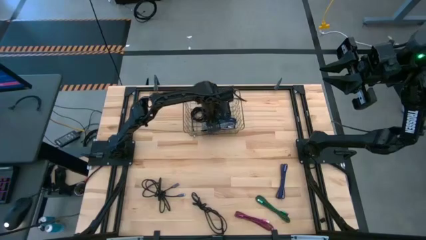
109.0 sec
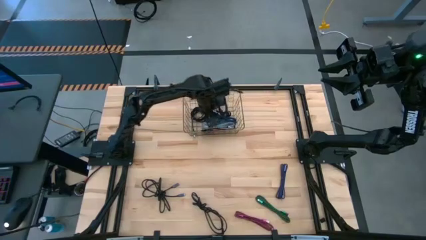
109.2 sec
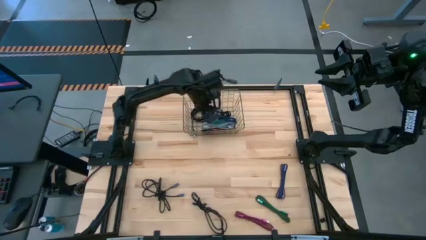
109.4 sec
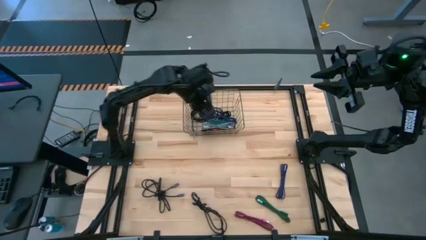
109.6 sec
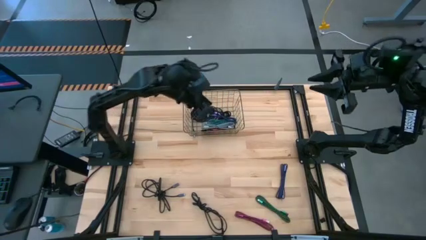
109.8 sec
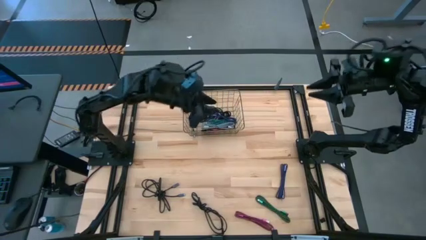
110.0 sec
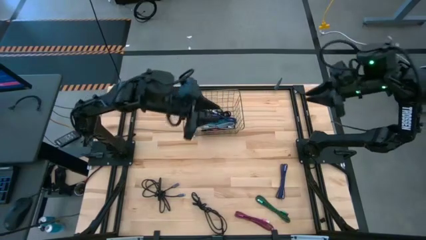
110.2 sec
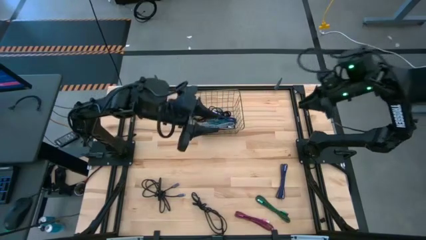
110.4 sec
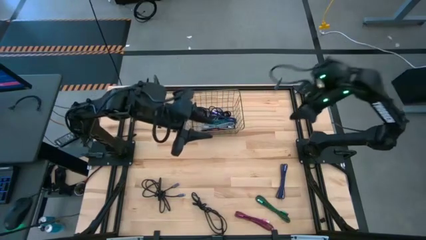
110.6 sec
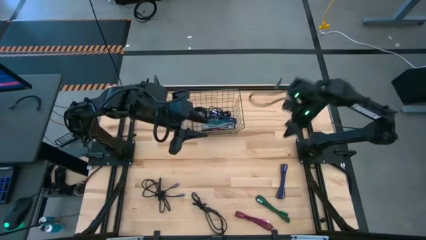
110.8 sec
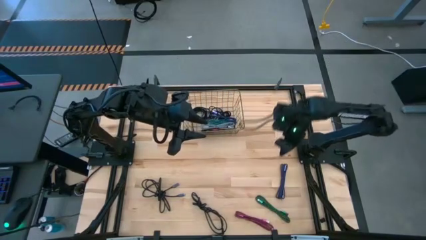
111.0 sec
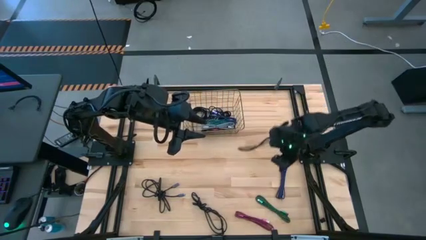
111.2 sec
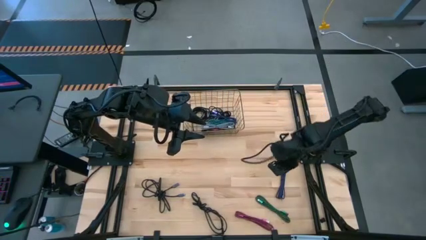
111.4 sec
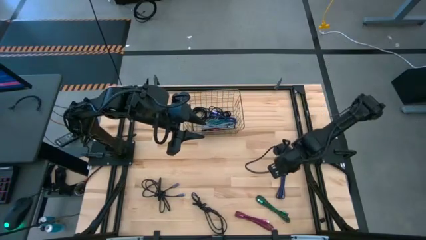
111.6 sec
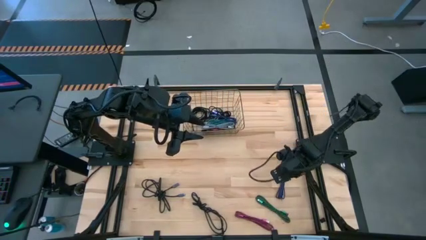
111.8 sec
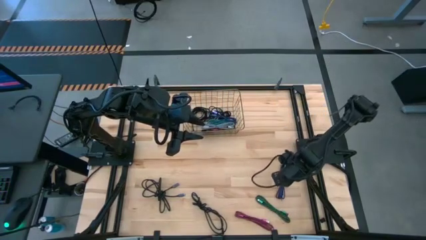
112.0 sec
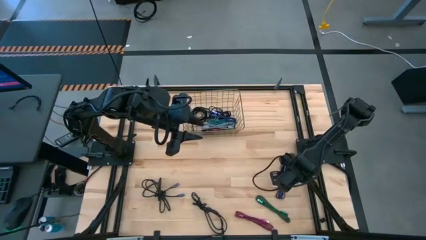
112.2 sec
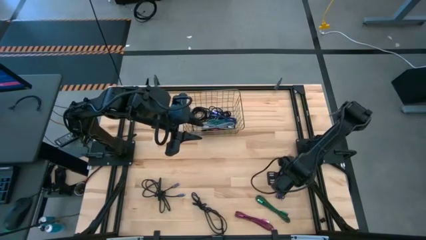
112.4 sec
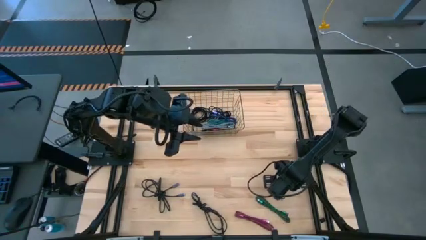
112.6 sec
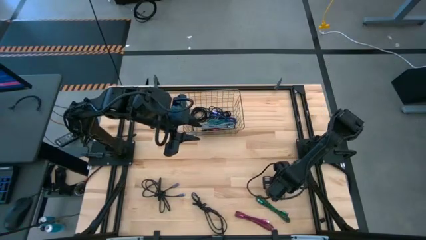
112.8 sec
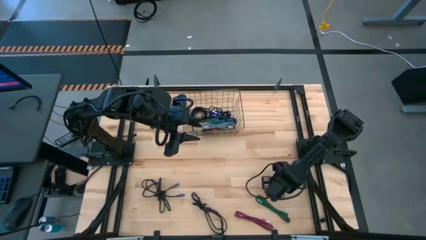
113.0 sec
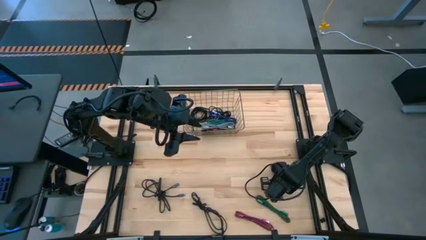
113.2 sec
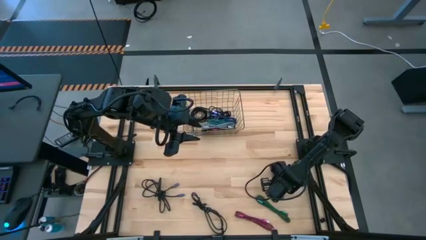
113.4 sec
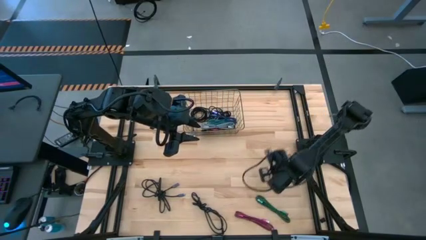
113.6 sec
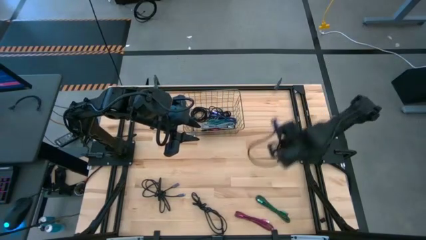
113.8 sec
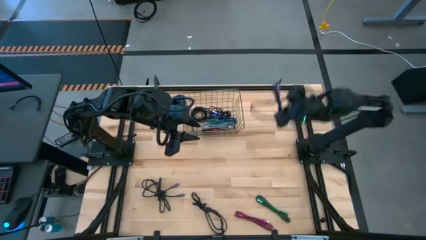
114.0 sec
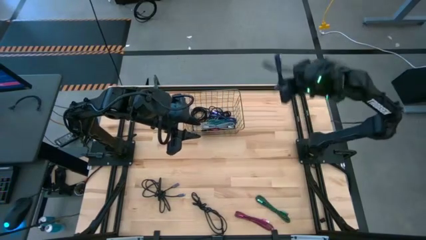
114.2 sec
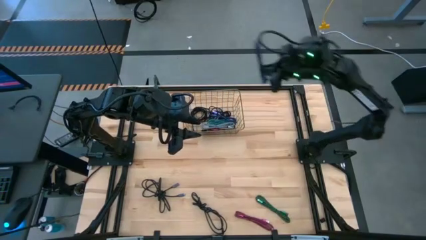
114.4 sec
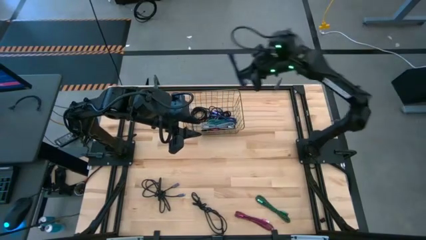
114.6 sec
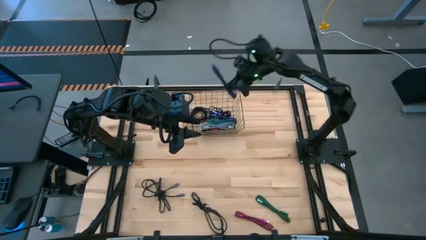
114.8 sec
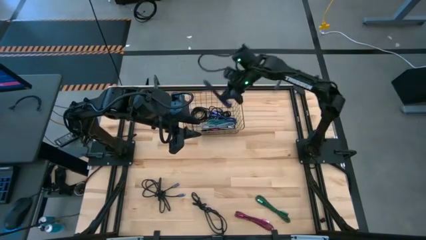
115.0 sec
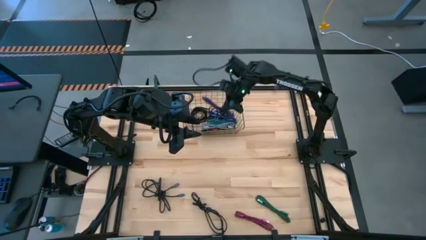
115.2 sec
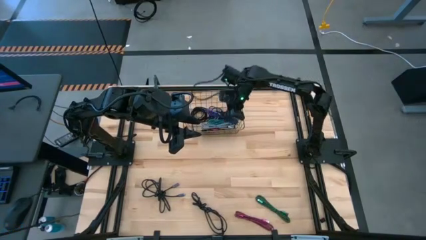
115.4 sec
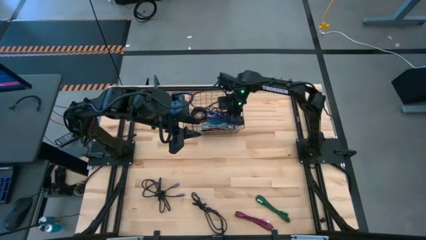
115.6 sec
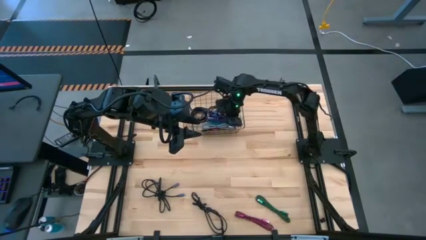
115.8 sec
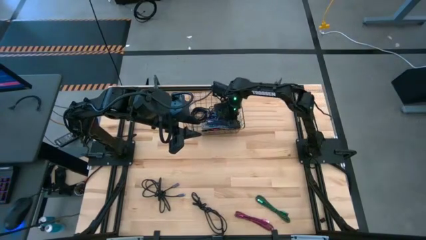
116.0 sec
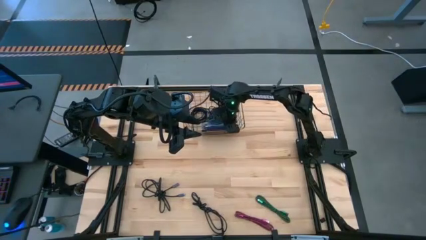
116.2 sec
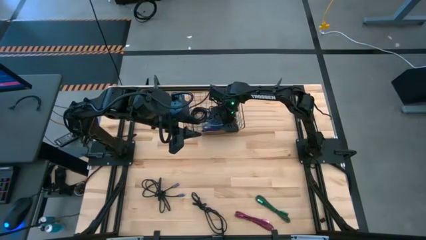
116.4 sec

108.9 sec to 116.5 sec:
Task: Pick and place USB-C Cables
Put the violet charger cable into the wire basket

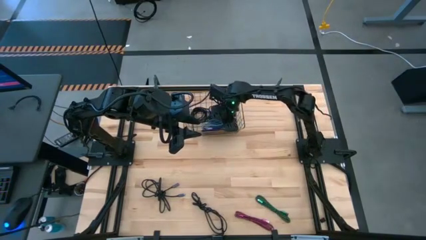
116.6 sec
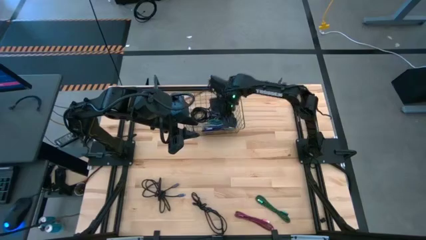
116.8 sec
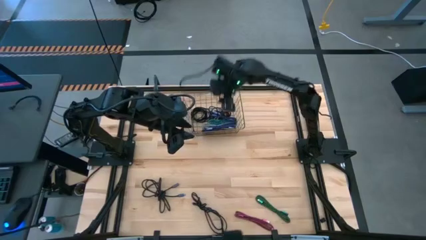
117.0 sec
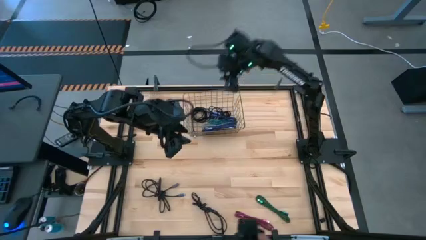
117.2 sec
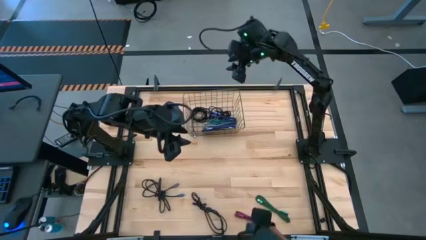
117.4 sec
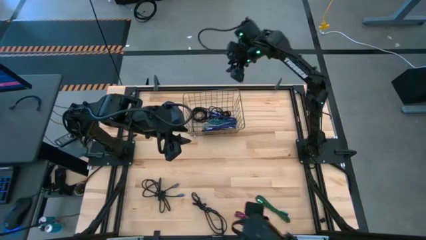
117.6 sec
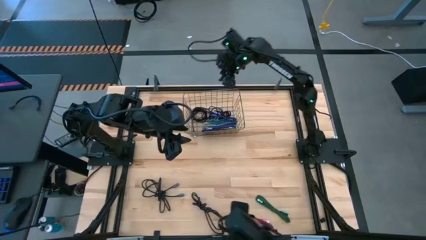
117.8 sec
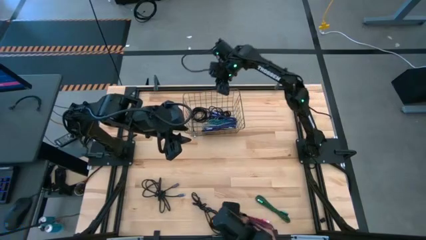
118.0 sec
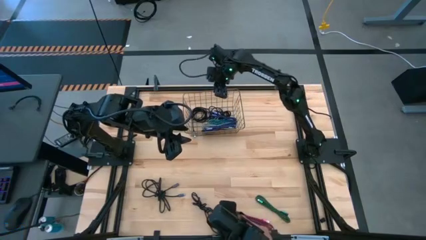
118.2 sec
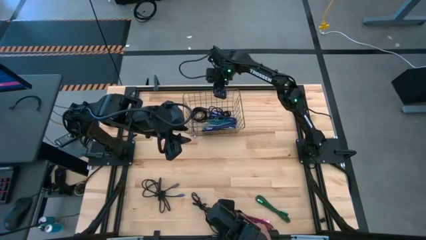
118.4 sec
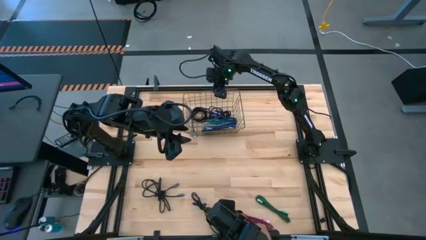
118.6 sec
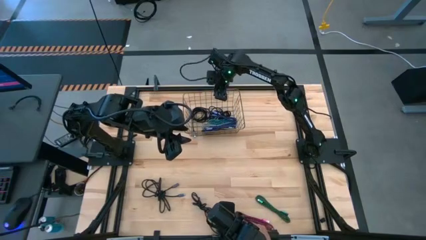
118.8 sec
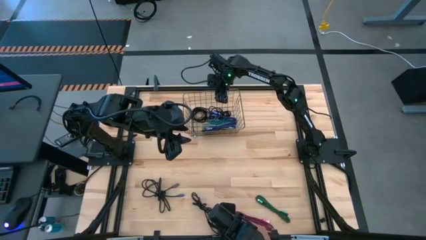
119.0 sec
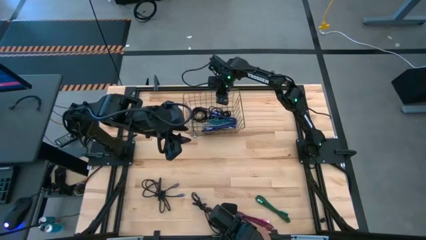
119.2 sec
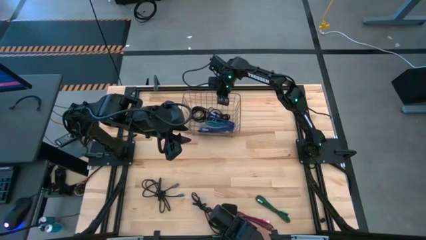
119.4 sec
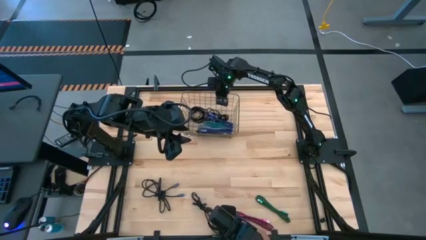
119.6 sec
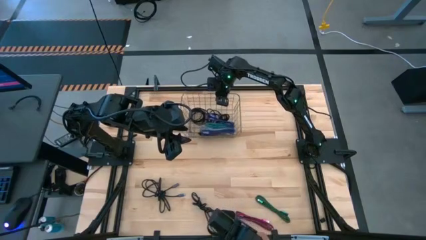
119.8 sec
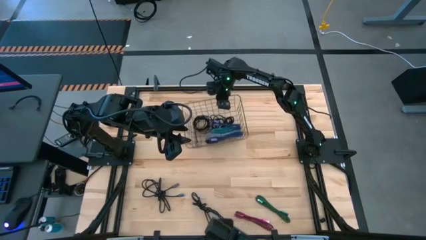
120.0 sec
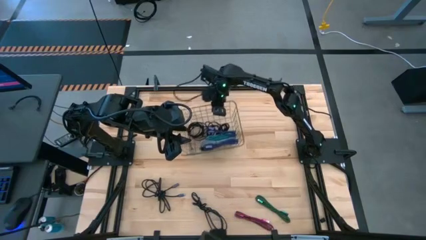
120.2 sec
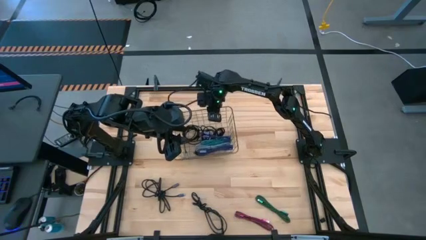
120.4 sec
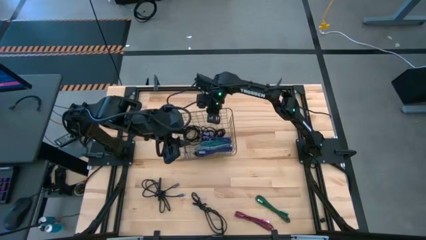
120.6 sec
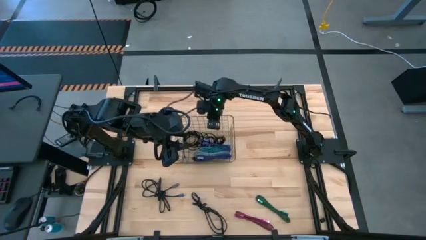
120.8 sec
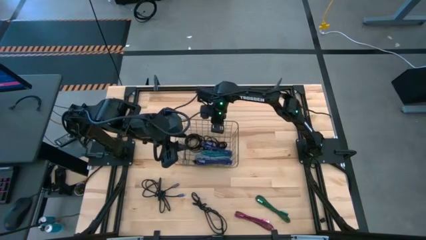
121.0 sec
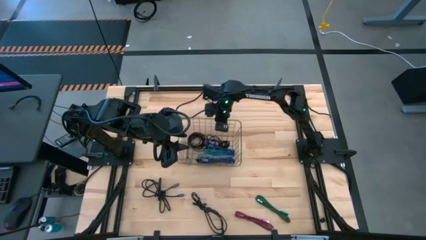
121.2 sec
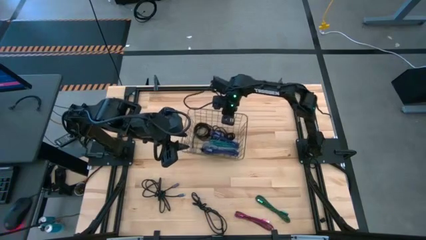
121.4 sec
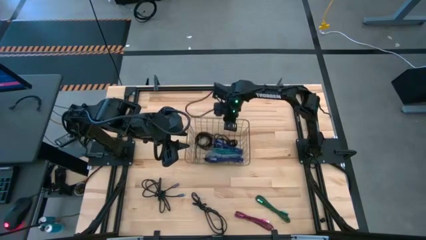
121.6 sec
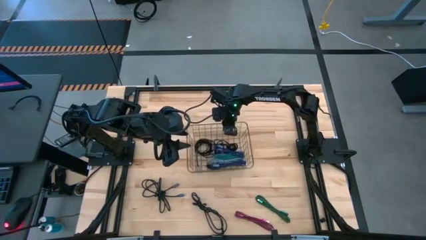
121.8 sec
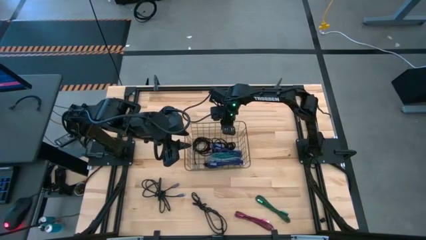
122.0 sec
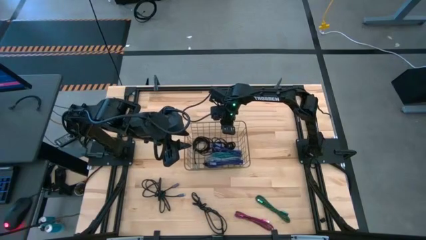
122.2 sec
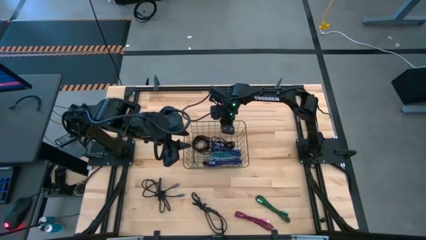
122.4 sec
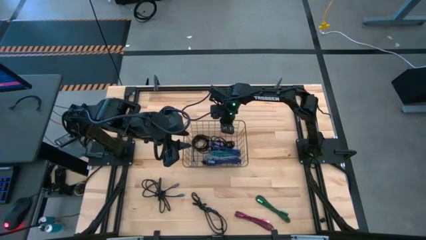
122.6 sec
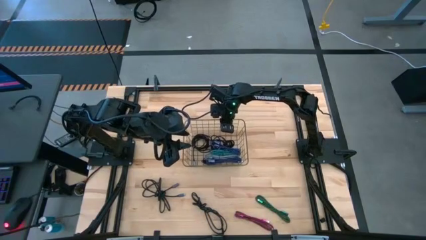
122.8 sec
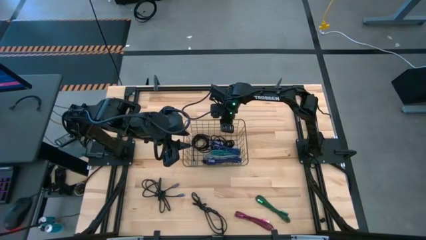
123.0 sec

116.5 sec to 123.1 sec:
Move the wire basket to the center of the table
